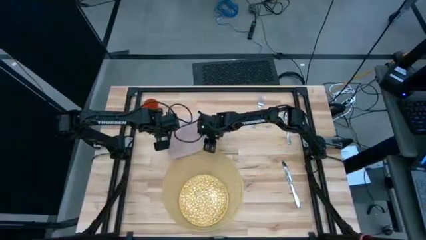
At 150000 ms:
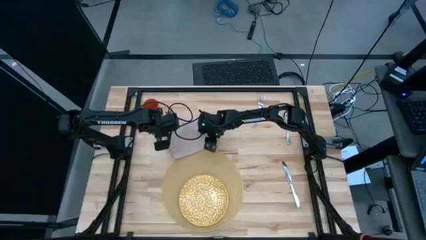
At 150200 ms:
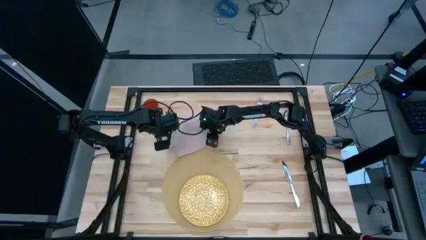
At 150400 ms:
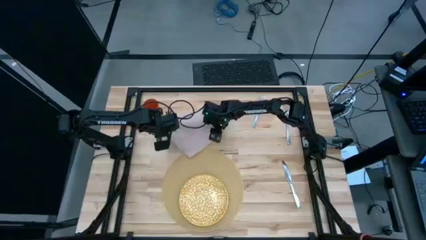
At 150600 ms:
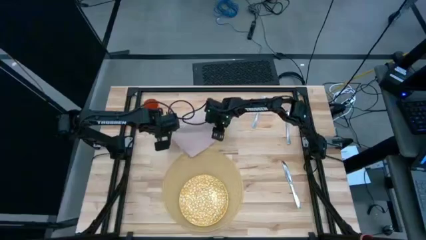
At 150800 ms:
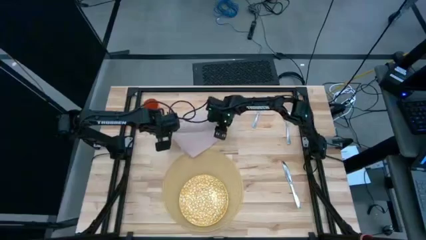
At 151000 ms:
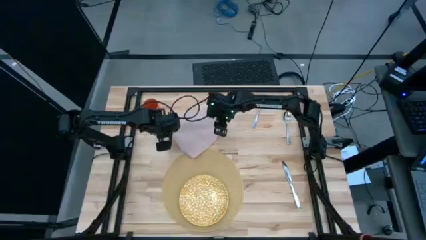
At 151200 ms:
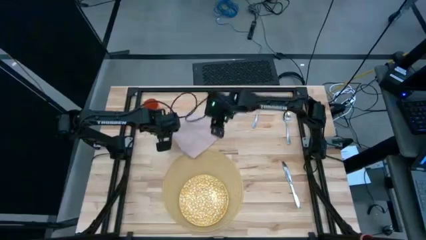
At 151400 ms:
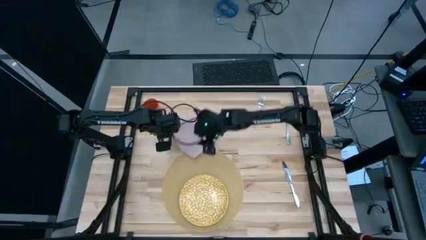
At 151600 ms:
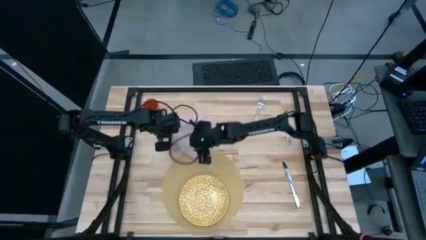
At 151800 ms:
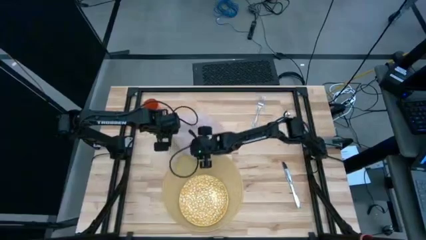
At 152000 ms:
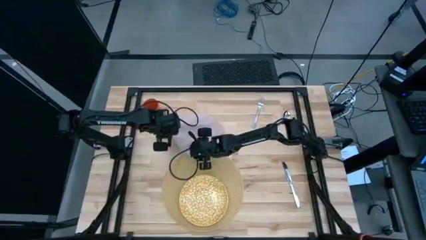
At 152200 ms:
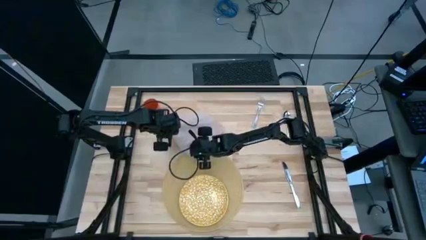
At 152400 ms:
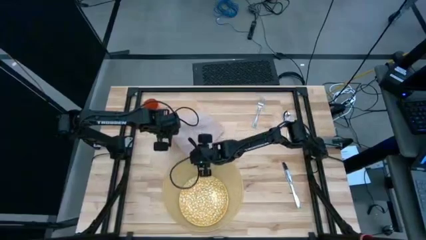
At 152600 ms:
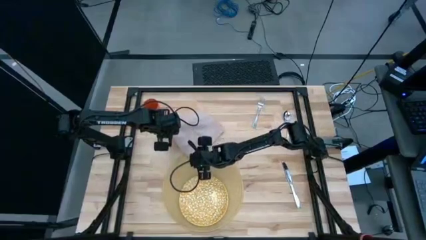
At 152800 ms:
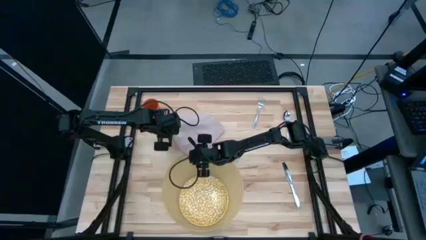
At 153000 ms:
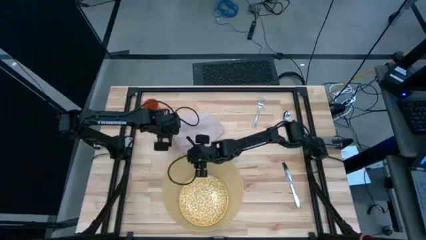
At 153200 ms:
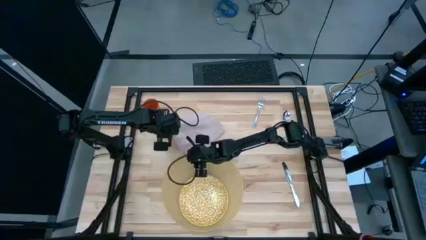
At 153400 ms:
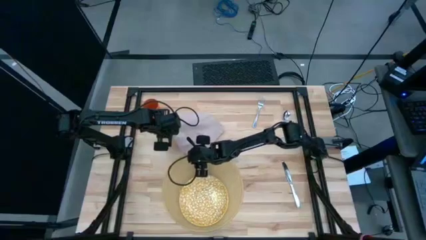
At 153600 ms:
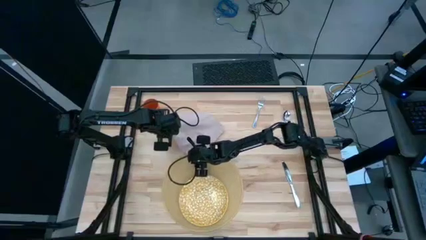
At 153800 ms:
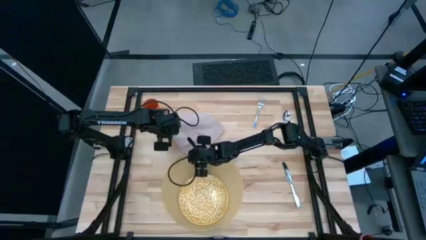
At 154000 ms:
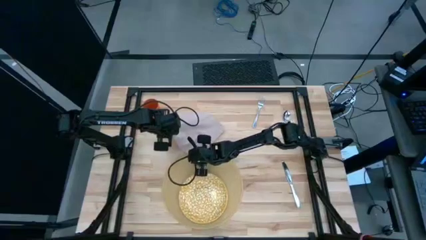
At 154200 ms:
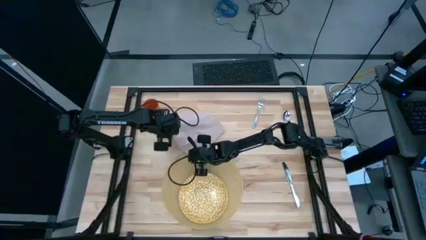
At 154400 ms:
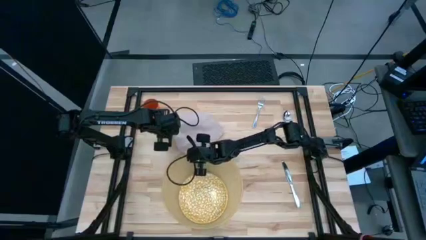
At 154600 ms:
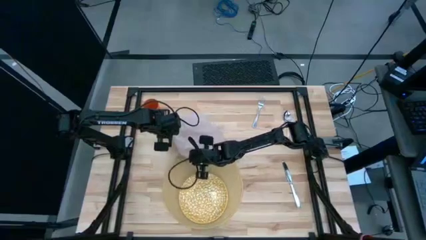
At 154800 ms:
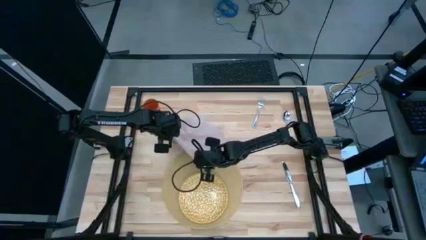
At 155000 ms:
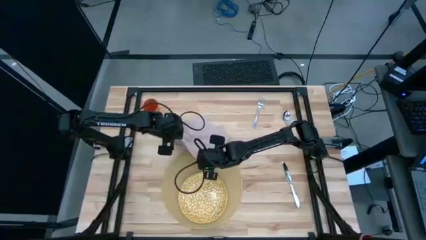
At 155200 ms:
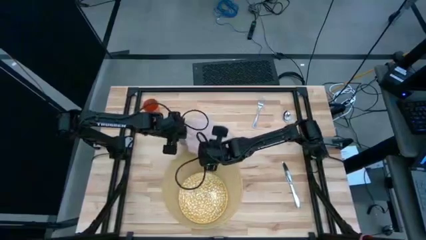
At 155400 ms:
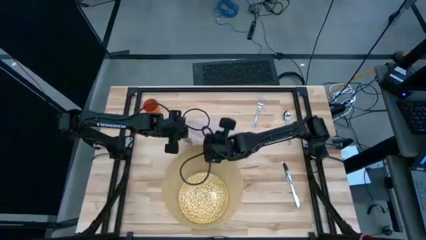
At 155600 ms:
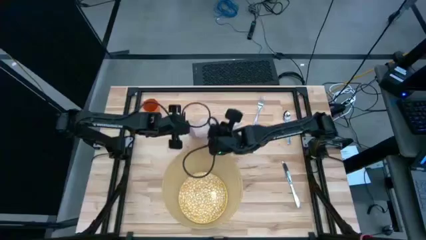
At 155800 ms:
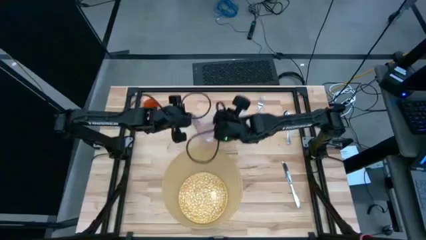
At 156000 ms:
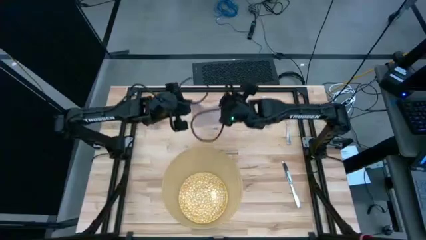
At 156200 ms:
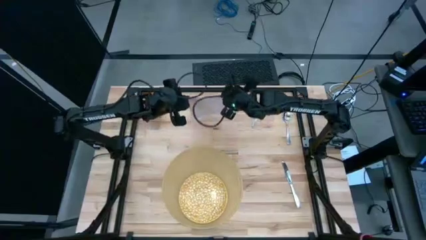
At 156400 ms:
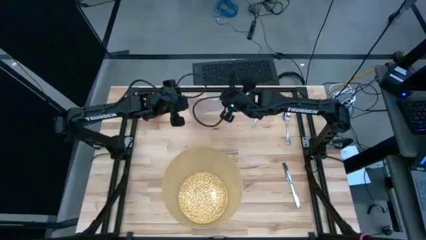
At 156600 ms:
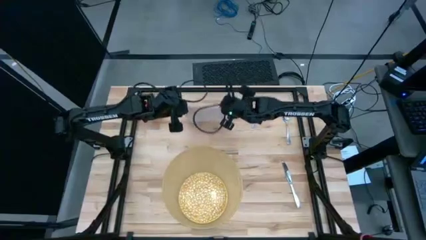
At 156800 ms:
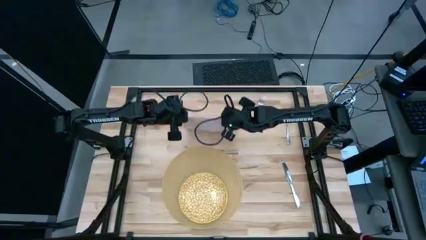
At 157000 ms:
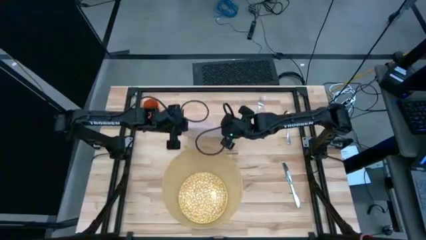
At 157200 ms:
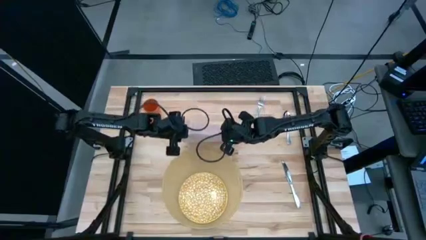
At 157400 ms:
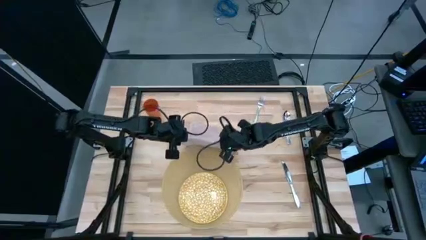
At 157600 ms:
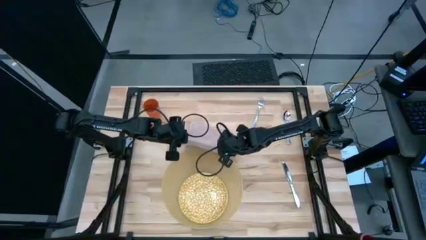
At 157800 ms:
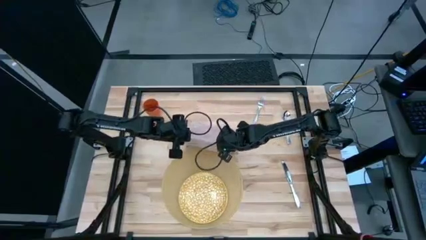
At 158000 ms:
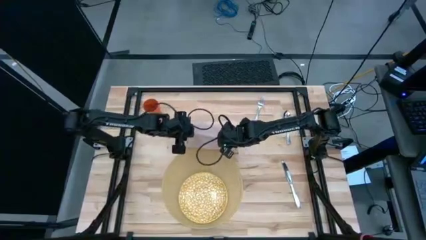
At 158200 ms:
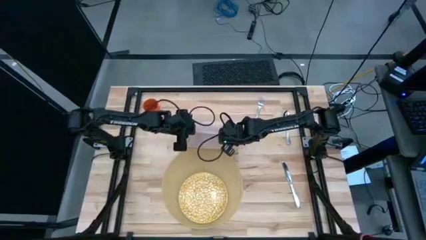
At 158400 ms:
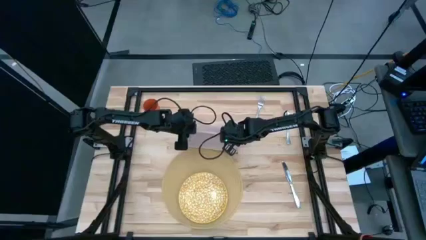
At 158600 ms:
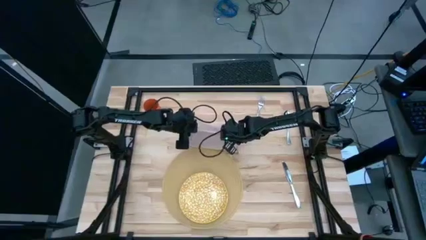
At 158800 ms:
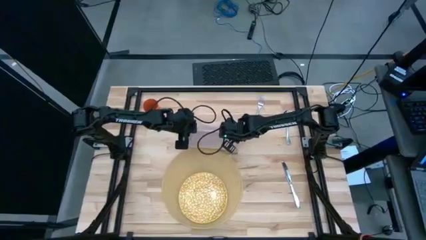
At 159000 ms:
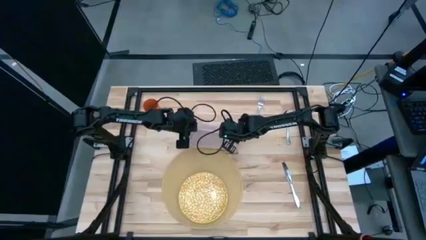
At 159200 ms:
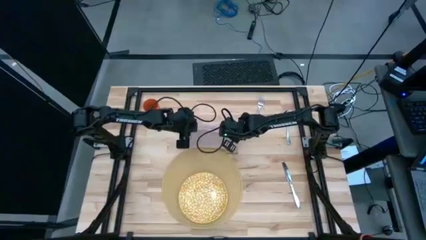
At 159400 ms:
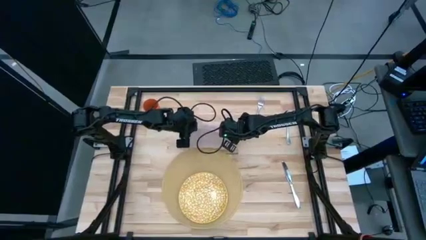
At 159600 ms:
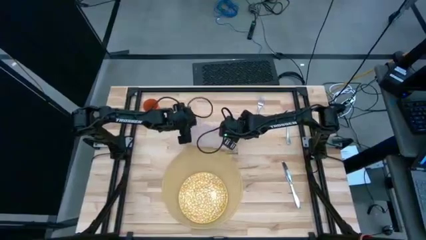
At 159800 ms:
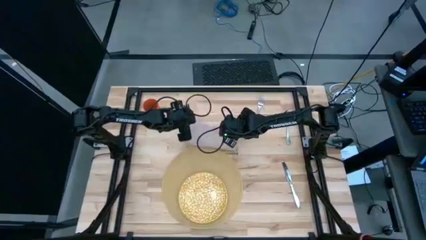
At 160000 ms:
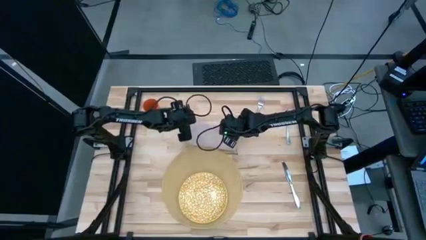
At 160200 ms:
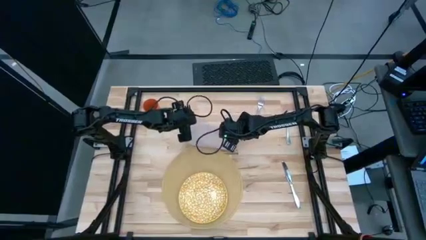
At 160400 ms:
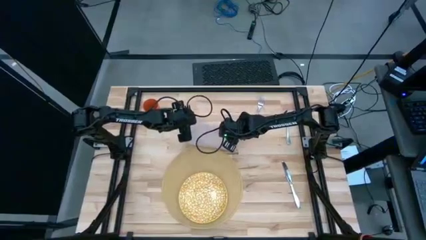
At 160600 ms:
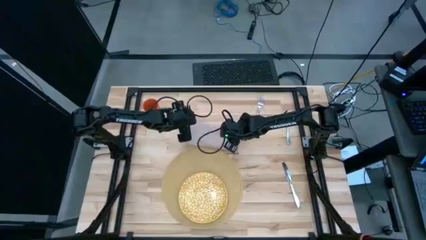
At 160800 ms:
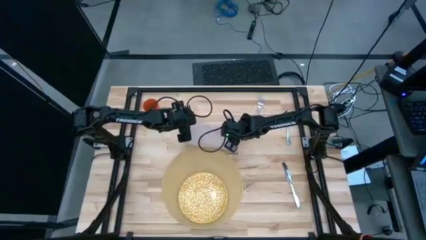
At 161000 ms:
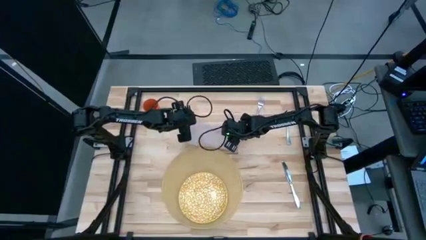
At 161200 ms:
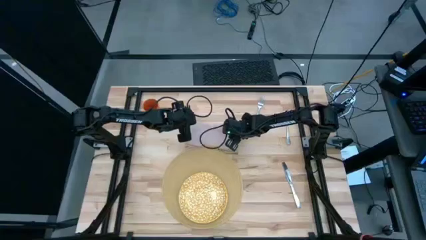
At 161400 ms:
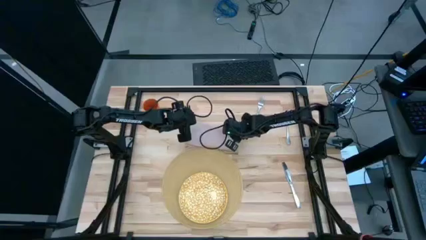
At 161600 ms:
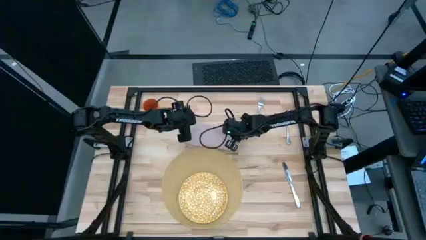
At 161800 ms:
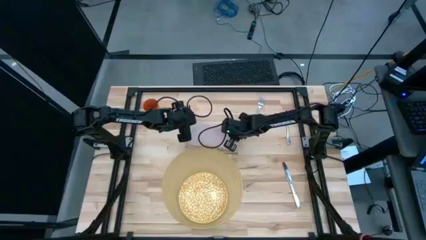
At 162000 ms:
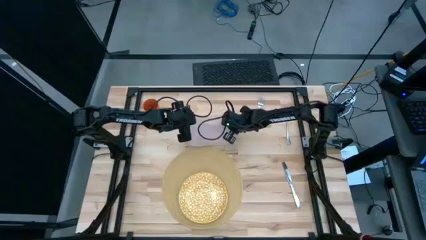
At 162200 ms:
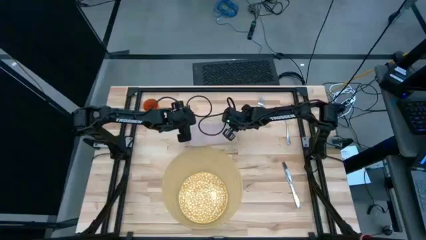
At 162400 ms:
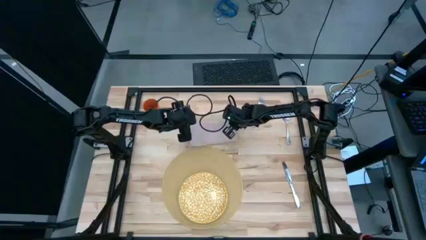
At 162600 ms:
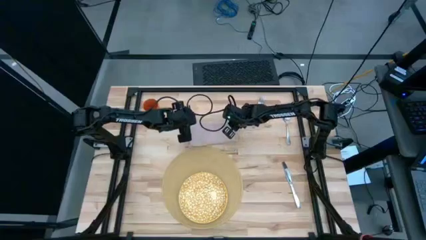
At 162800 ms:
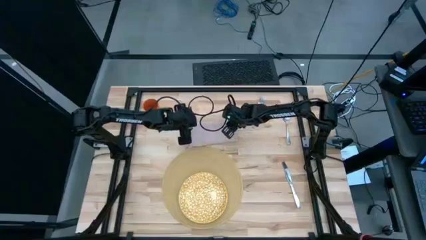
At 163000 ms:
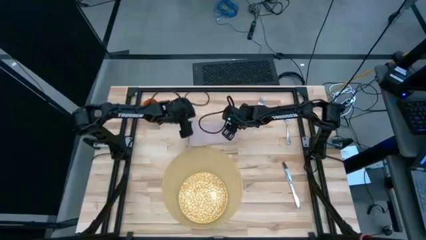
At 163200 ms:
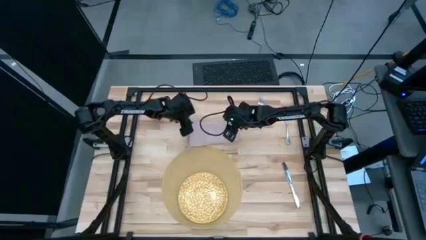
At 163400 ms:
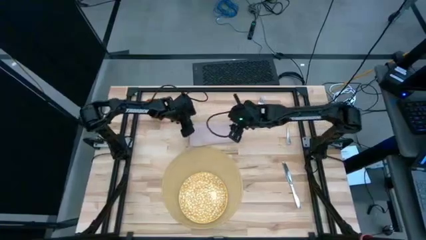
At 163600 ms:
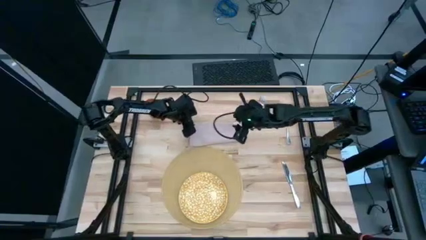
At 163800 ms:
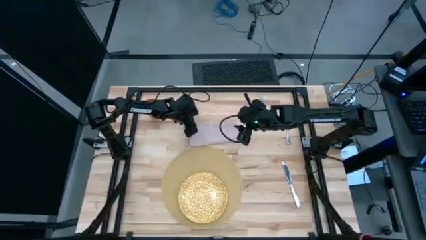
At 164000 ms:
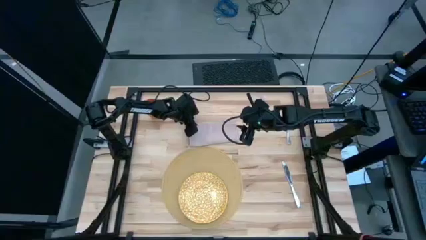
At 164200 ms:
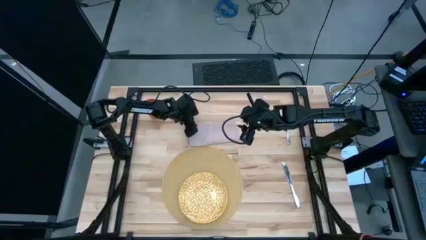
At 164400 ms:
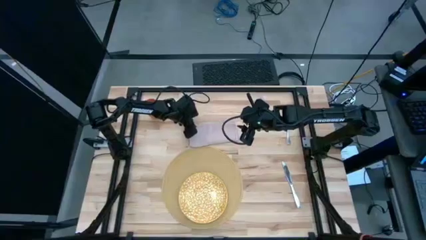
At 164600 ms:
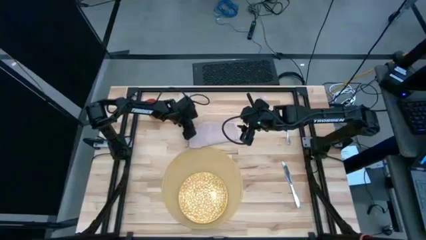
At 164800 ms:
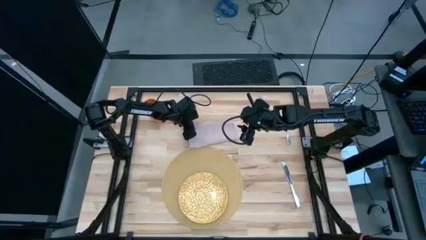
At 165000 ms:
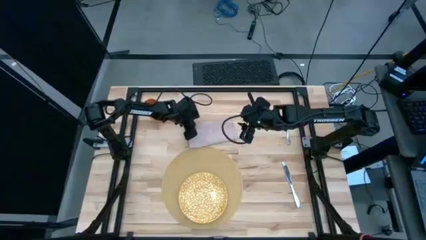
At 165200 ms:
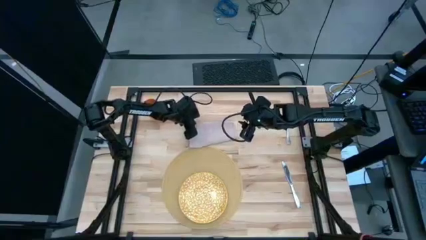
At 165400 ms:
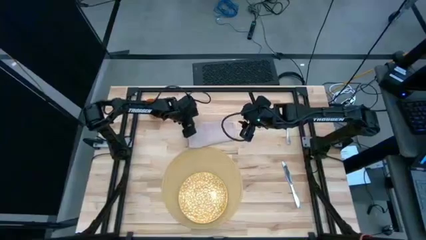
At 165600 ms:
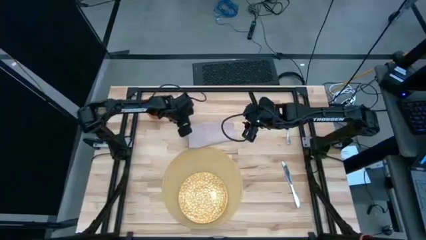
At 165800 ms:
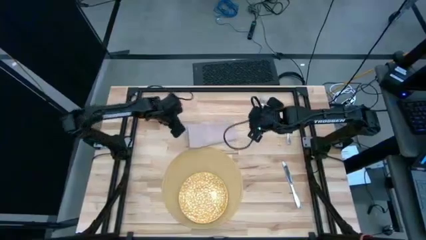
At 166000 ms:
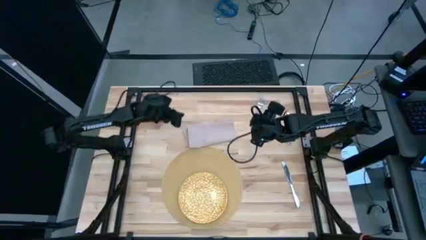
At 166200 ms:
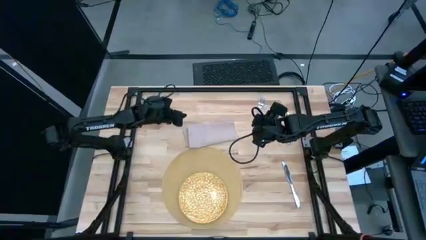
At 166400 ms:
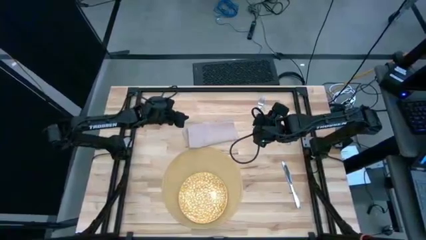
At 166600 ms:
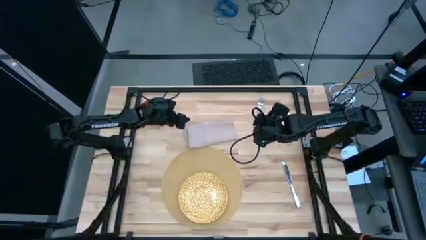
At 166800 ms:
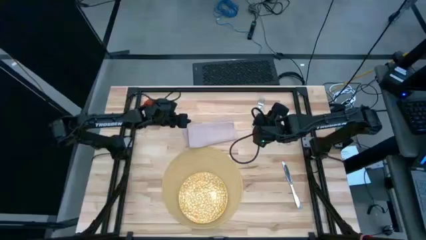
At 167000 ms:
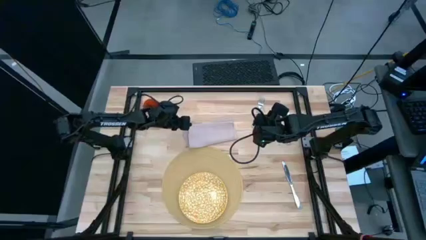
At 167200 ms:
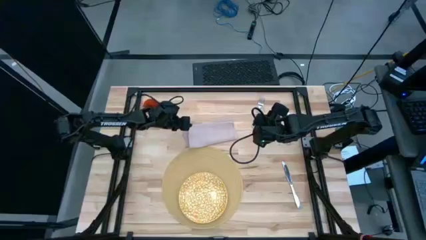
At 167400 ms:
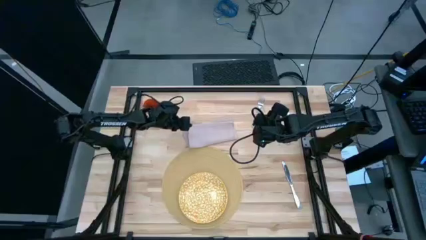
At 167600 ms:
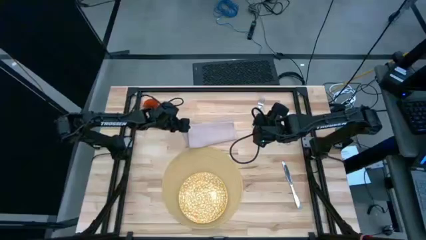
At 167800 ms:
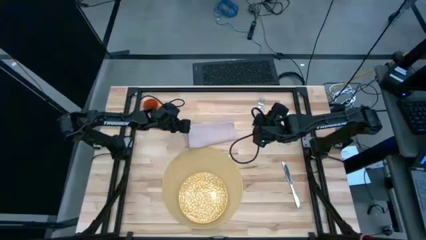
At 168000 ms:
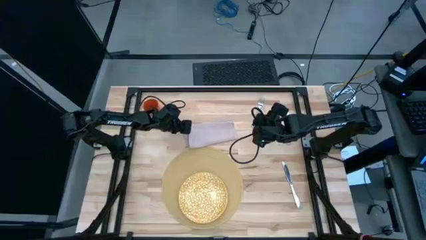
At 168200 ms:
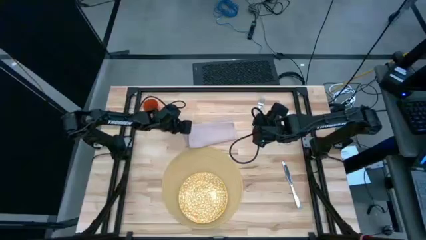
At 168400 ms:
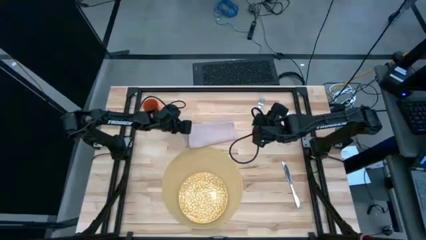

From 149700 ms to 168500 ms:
Task: Set table place
Fold the light orange napkin on the table
